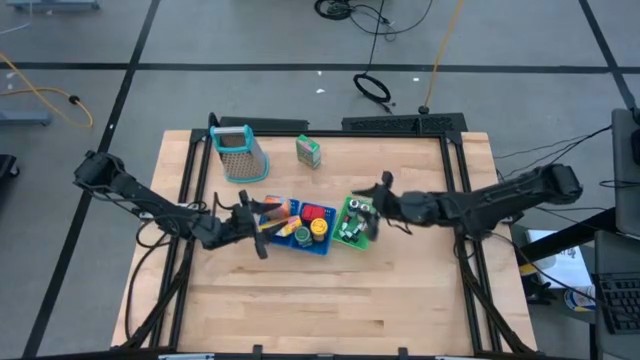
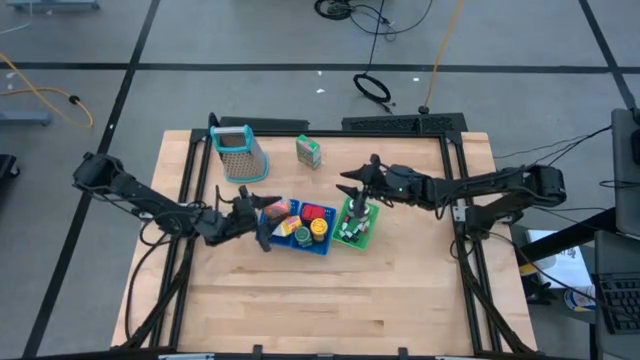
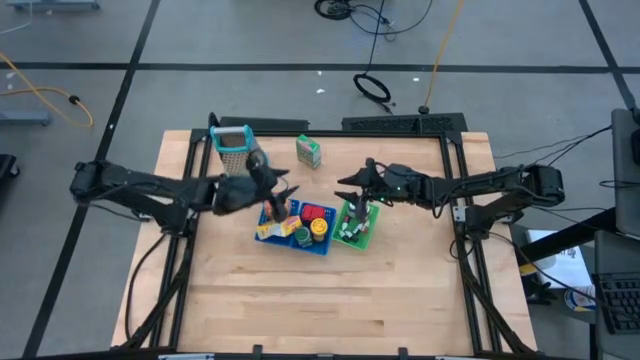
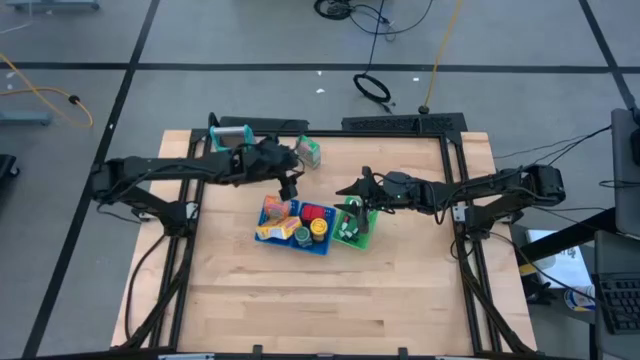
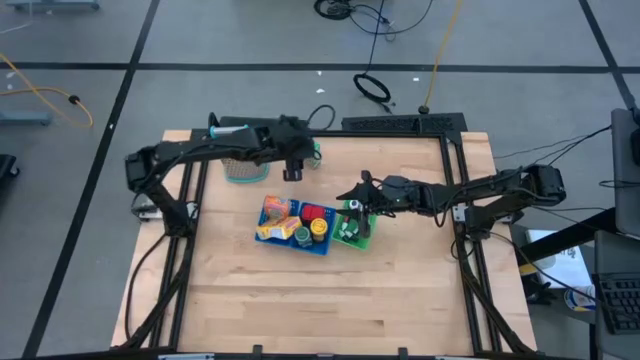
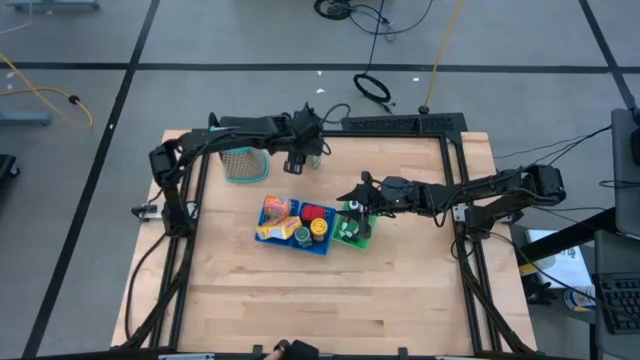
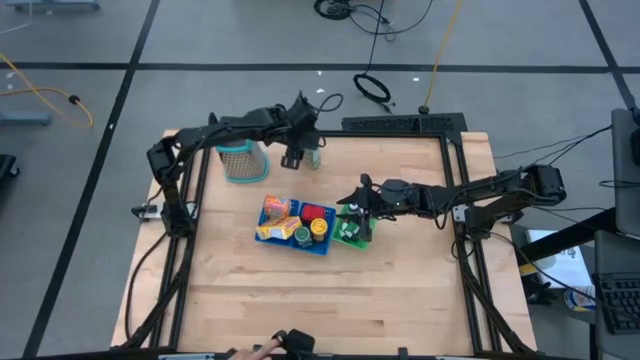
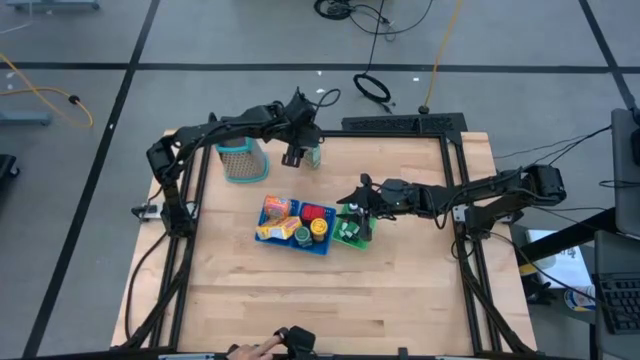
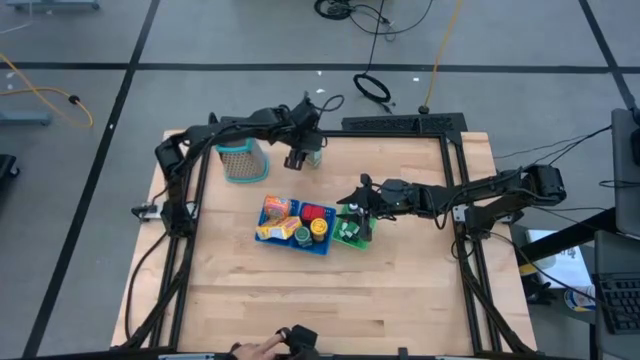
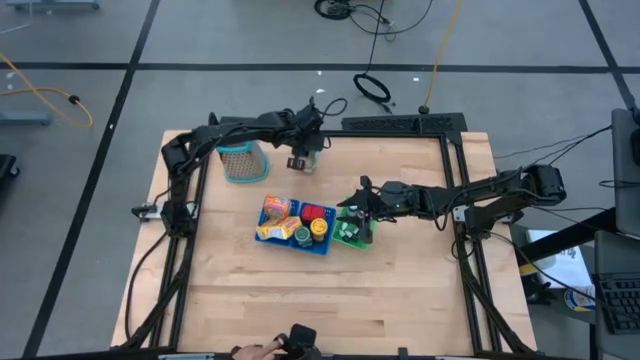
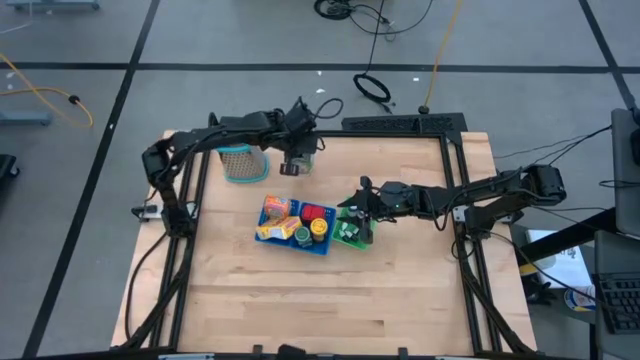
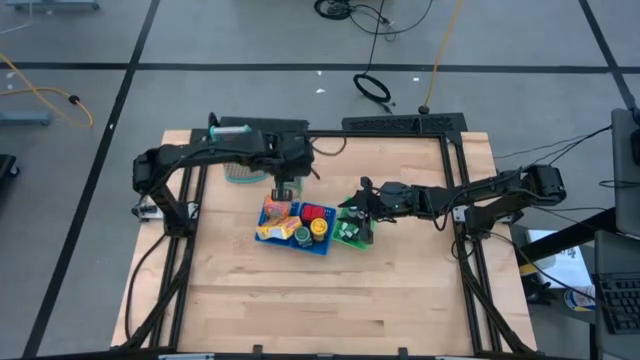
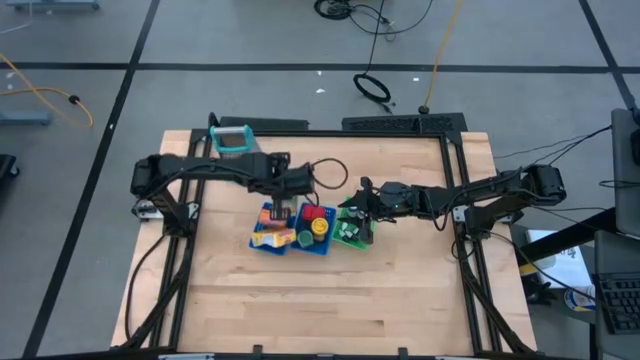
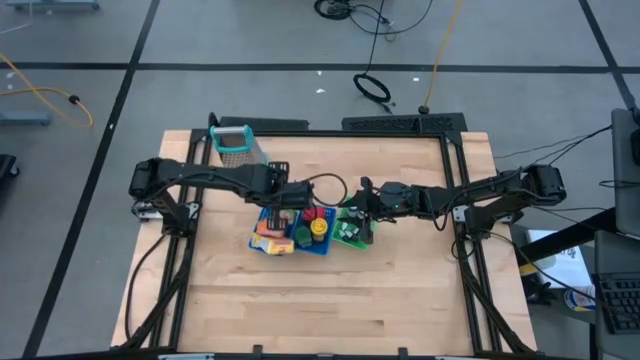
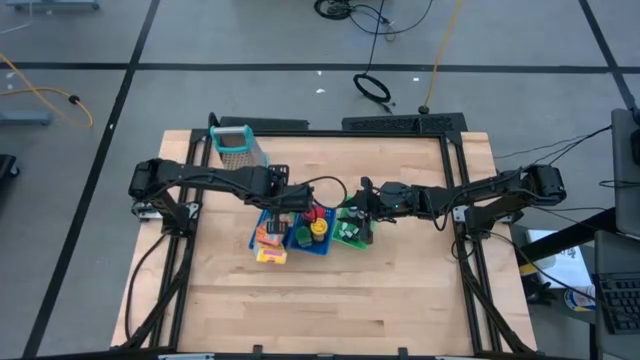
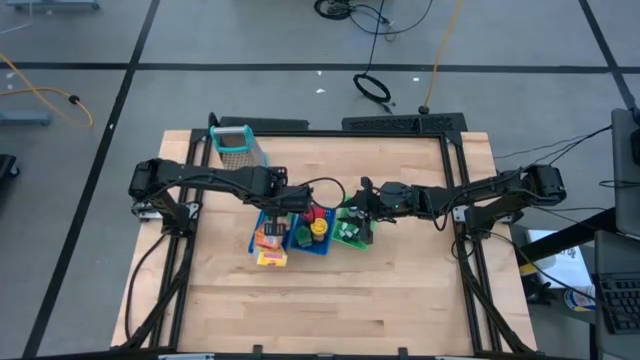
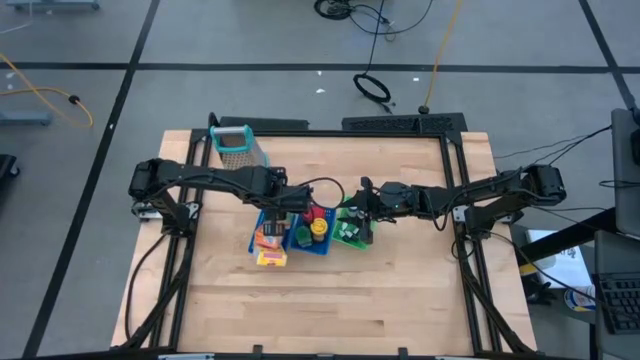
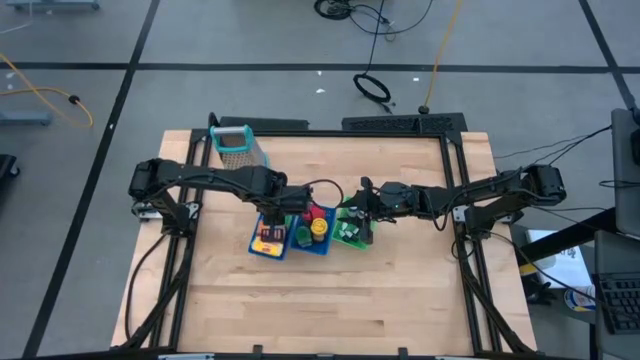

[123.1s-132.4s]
Task: Pick & Place Kitchen Items
Put the green cereal box into the left blue bin

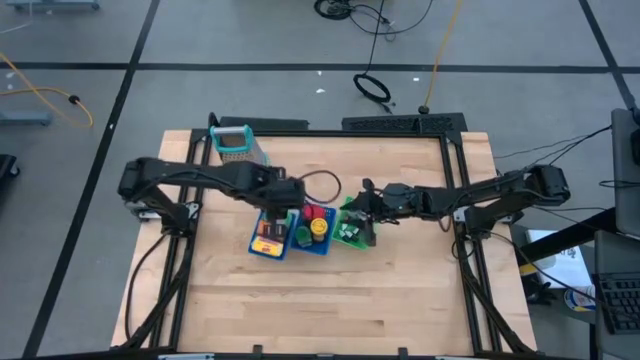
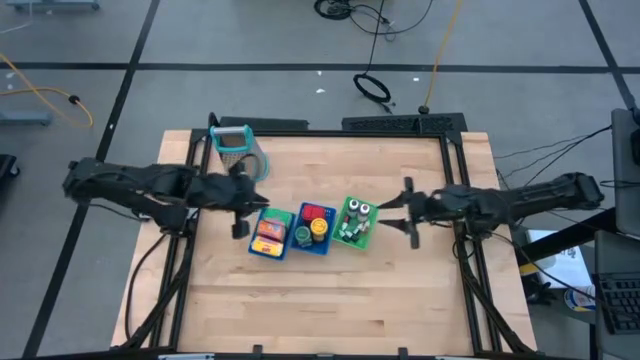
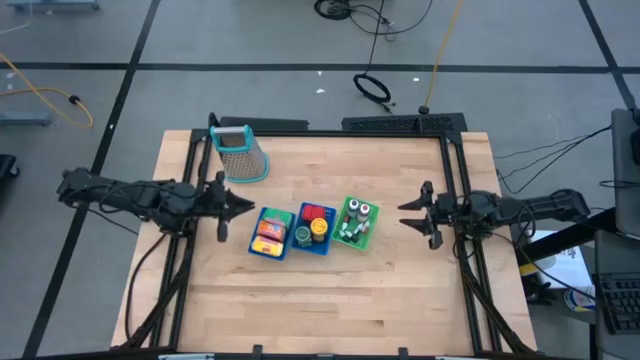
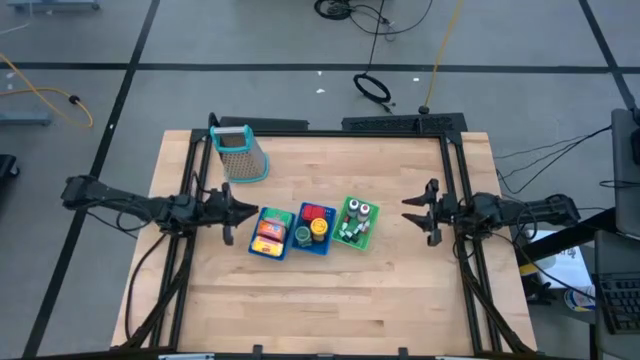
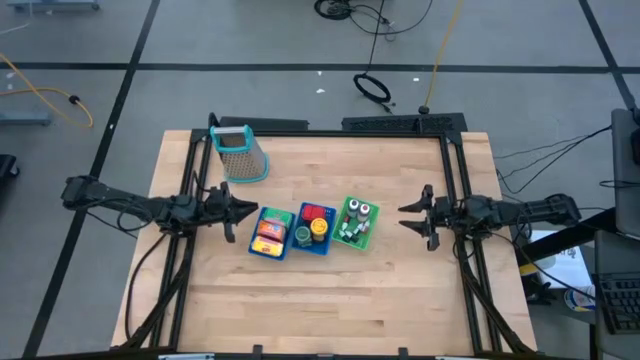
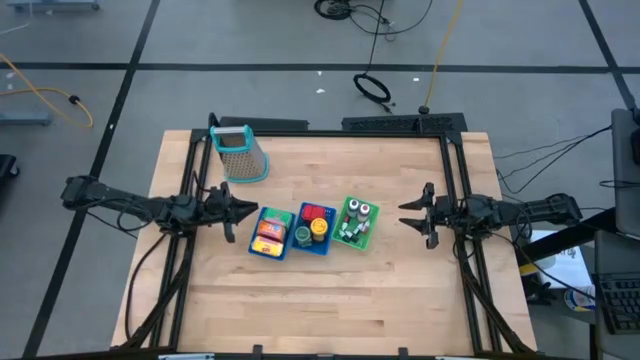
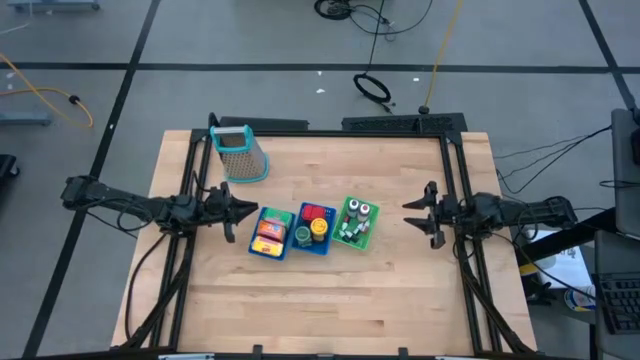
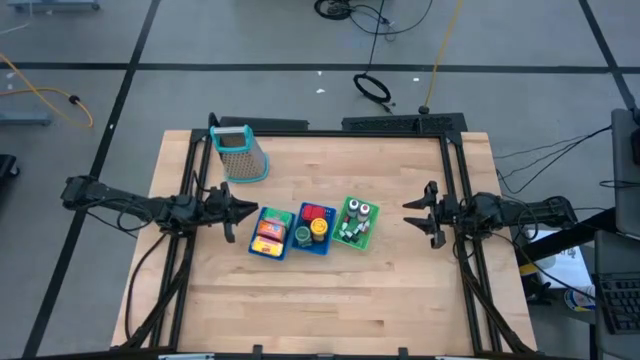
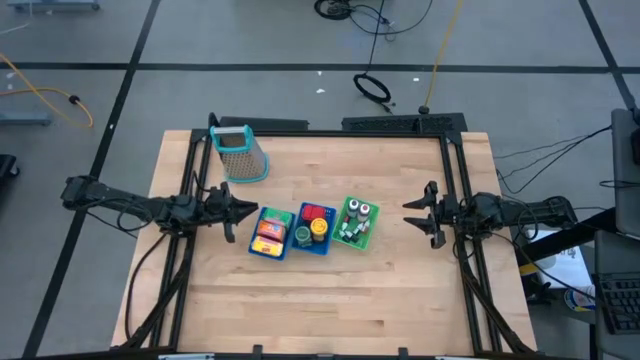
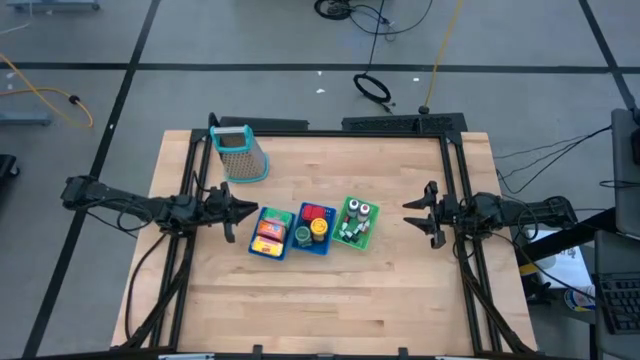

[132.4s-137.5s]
Return to Home Position
